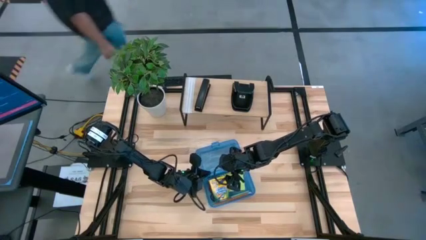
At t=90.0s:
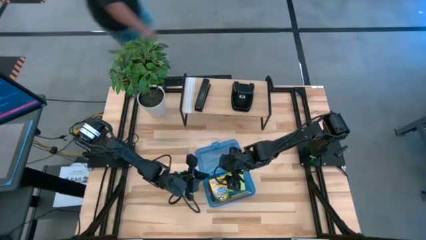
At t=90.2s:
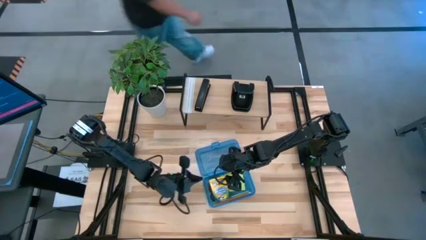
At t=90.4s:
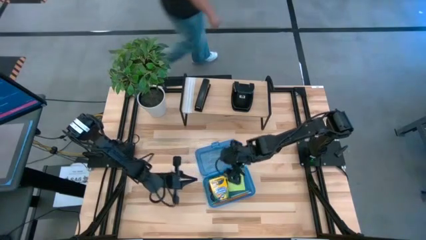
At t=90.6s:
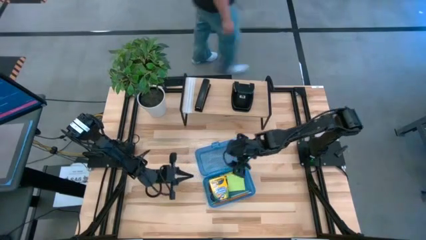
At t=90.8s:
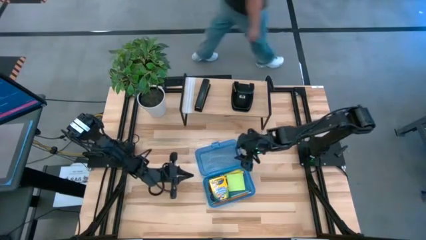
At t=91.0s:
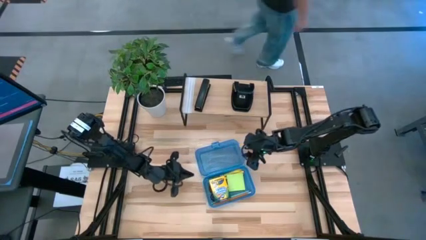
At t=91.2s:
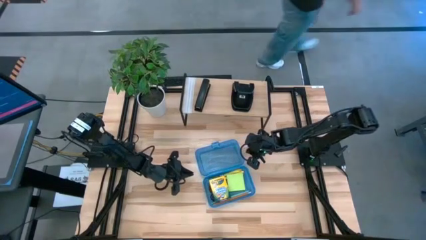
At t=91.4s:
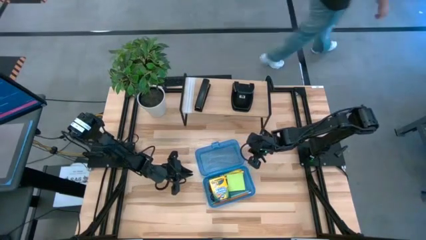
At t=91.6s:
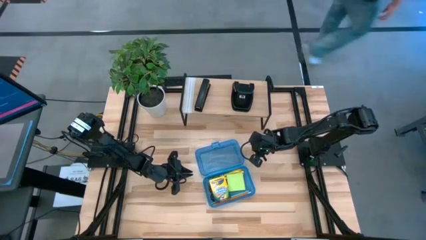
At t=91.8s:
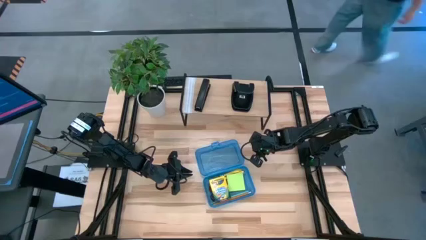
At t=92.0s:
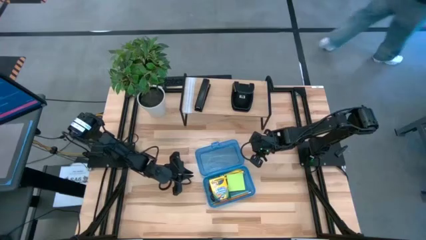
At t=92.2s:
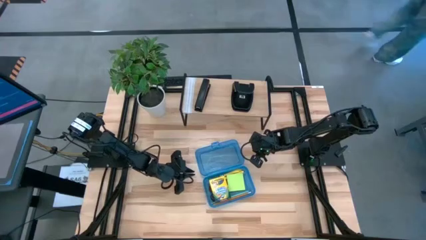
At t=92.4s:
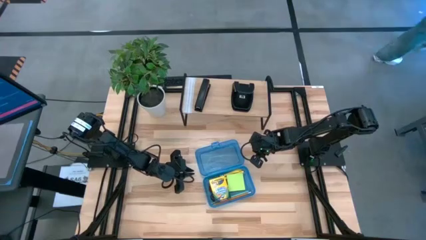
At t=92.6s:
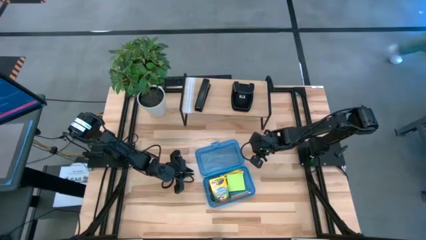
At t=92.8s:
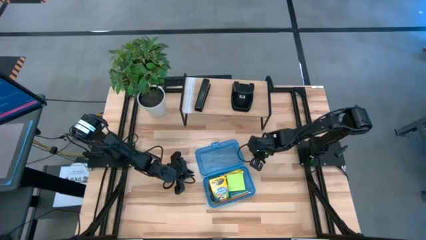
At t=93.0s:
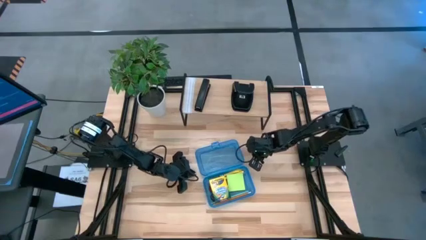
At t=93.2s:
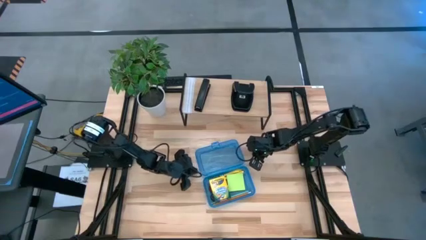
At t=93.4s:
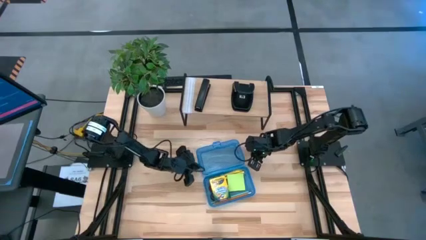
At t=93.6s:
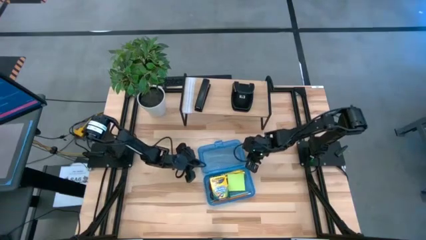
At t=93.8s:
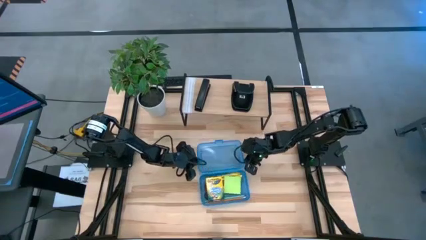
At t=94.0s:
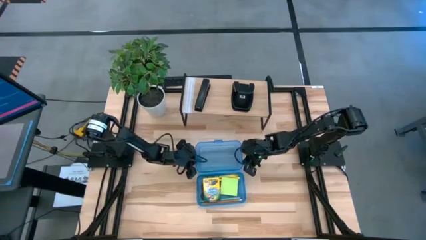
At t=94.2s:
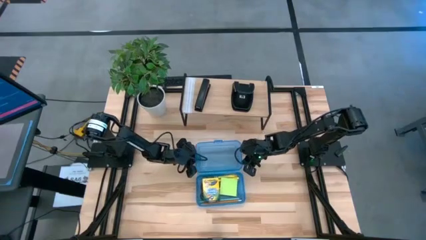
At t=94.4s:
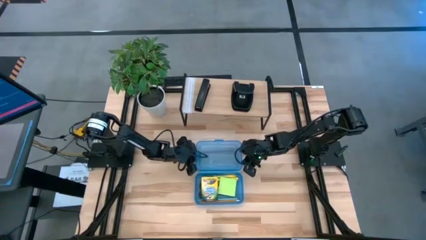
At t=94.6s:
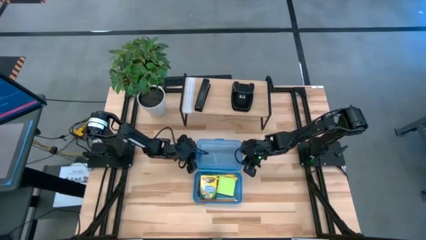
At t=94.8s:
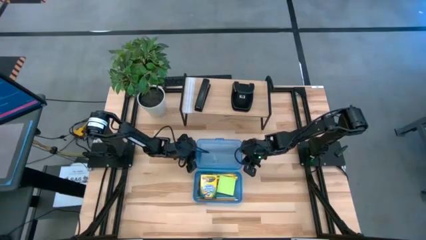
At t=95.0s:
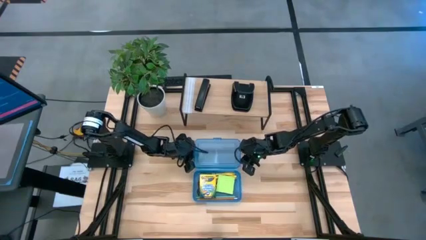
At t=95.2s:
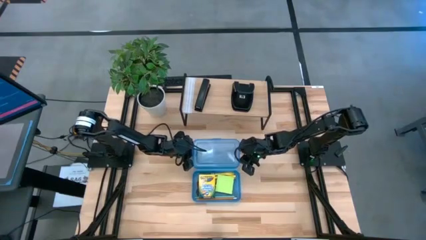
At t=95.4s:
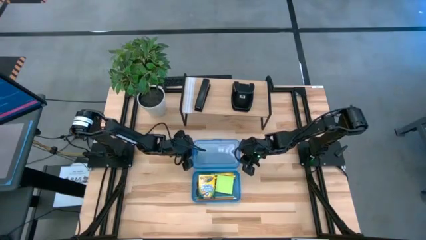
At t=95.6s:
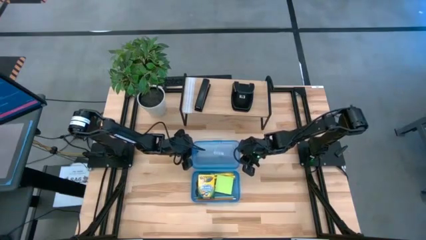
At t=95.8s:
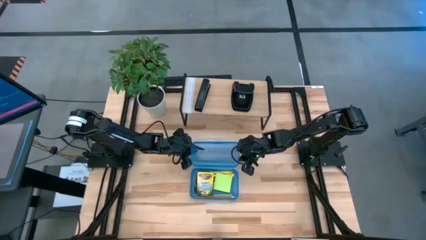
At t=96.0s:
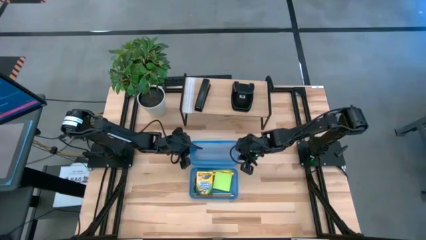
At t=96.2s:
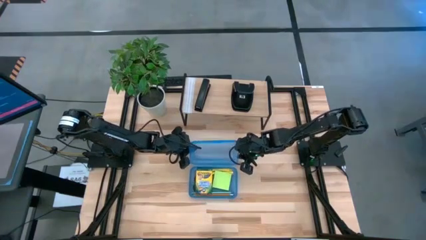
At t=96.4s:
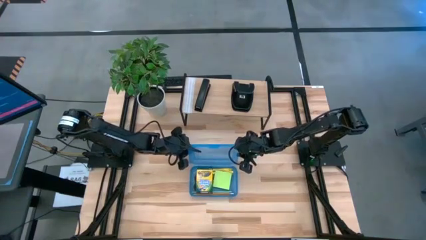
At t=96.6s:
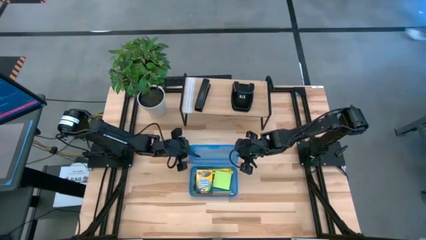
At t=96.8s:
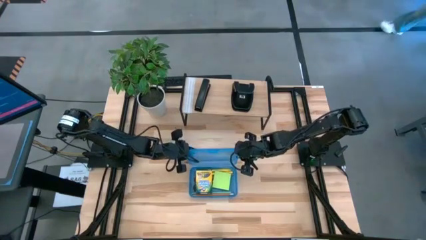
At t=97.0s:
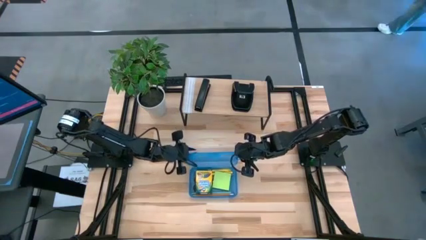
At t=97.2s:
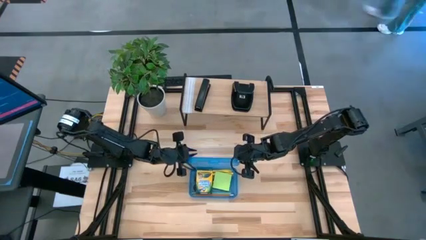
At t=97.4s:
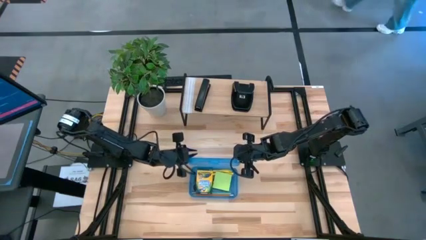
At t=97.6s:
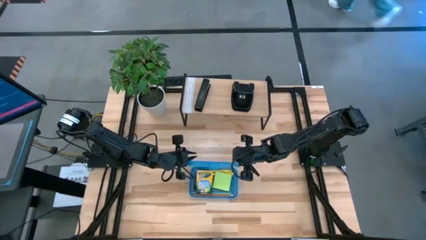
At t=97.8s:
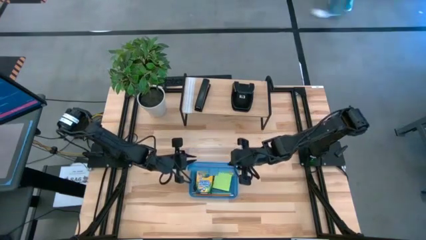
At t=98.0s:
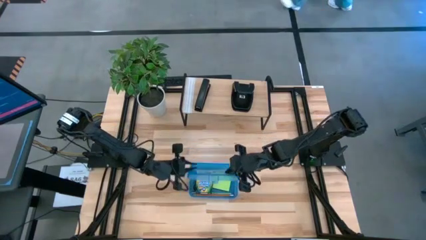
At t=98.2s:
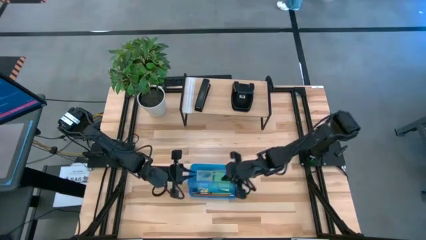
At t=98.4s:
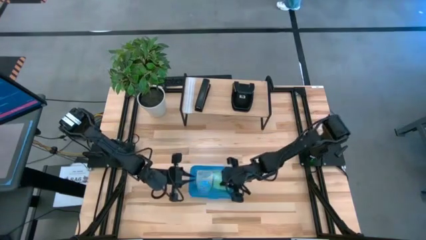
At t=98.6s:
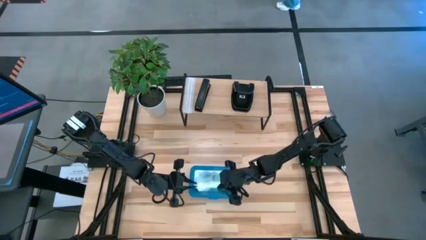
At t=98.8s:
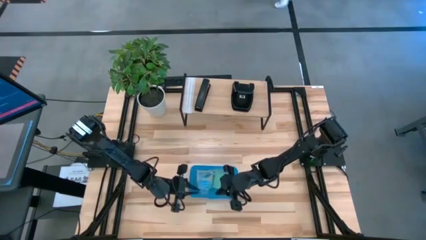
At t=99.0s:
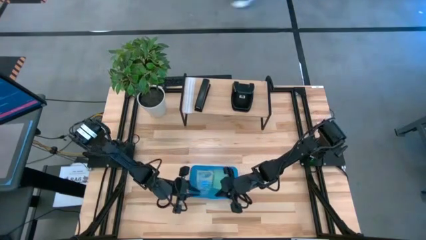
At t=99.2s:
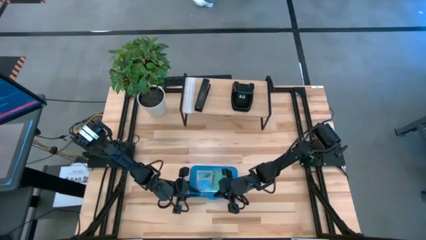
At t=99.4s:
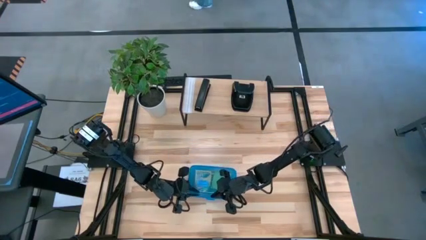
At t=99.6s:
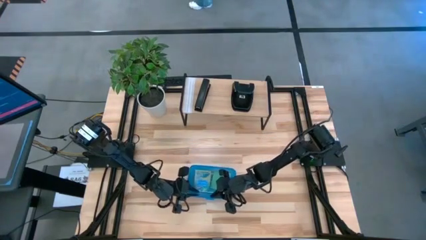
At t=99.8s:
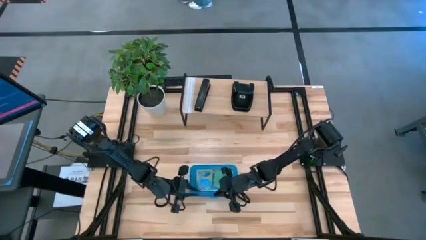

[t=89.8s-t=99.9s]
Task: Pack school essentials
Close the blue supply box

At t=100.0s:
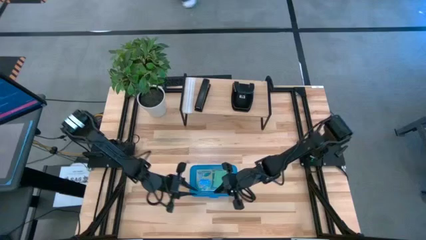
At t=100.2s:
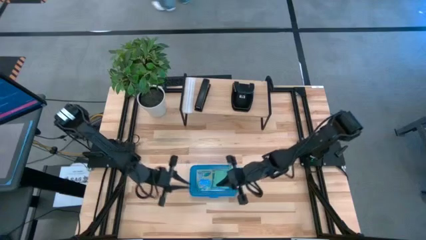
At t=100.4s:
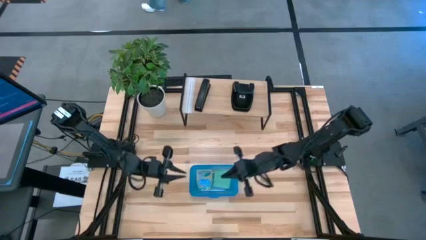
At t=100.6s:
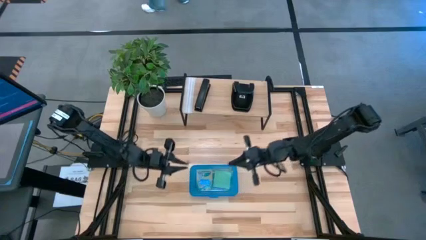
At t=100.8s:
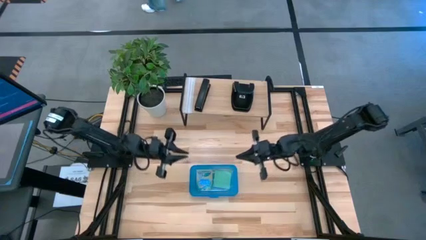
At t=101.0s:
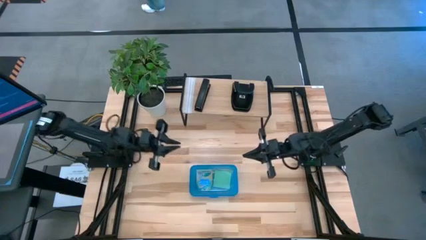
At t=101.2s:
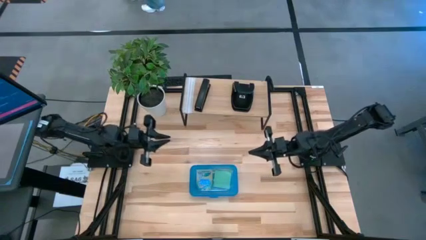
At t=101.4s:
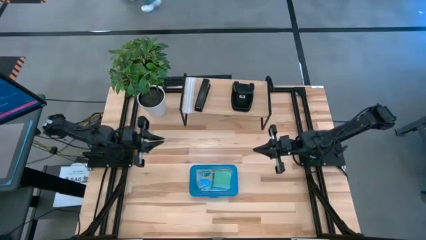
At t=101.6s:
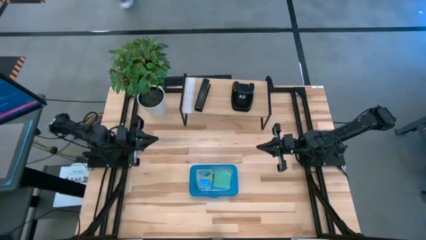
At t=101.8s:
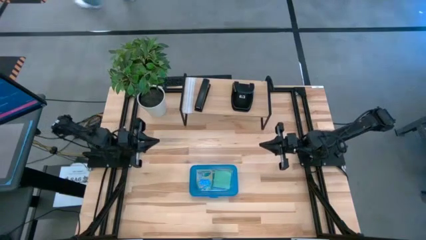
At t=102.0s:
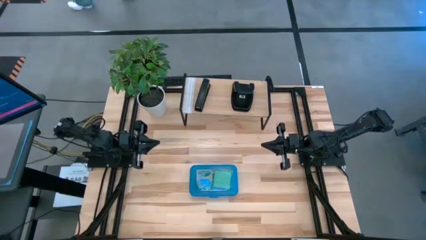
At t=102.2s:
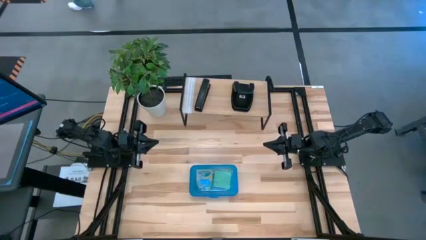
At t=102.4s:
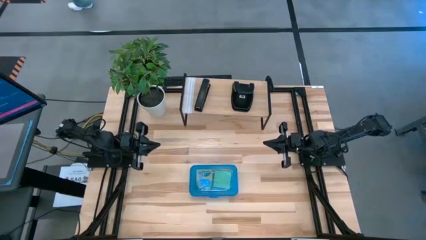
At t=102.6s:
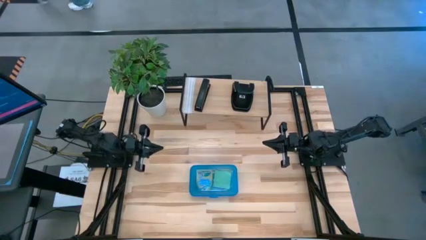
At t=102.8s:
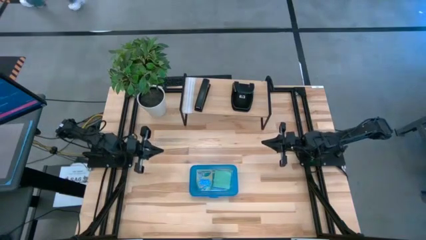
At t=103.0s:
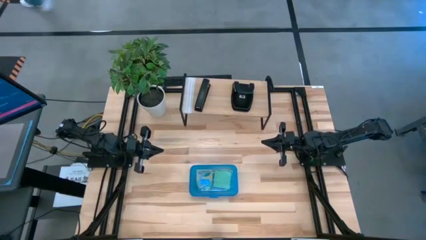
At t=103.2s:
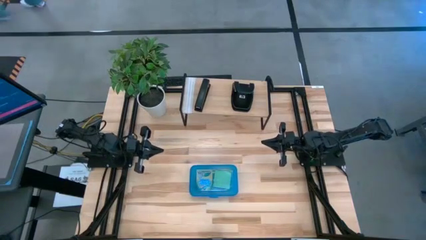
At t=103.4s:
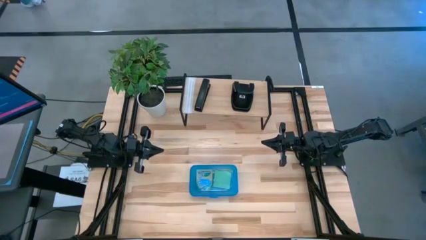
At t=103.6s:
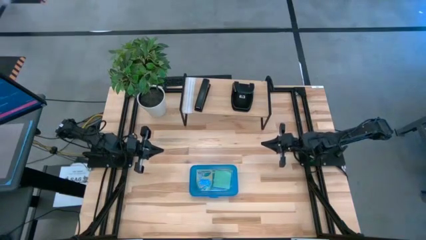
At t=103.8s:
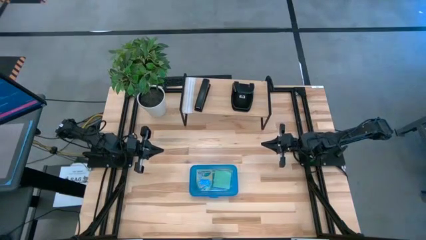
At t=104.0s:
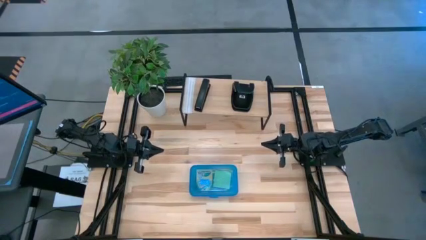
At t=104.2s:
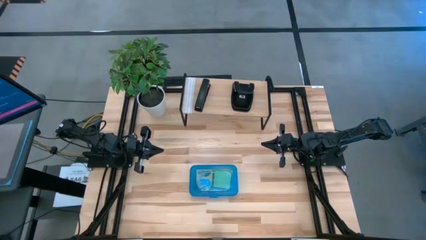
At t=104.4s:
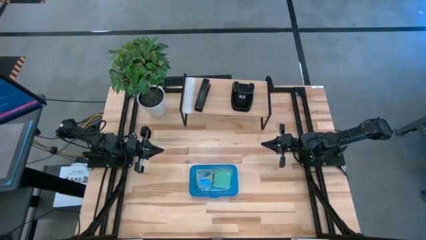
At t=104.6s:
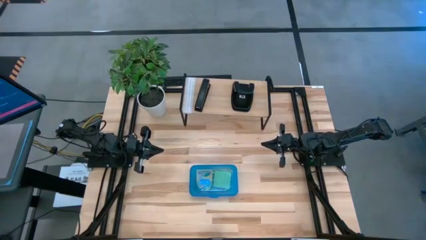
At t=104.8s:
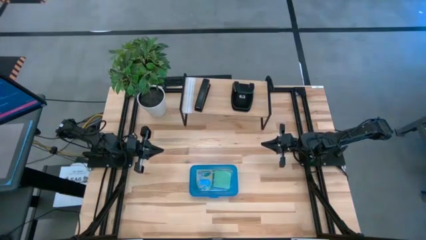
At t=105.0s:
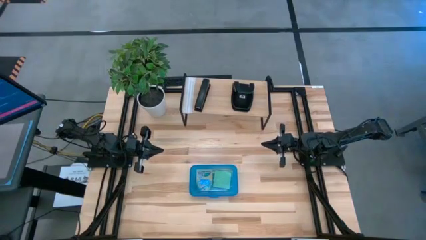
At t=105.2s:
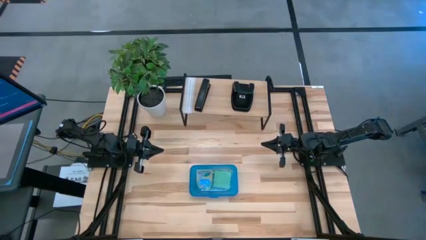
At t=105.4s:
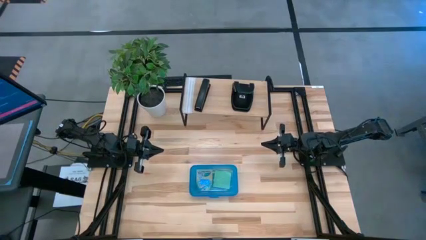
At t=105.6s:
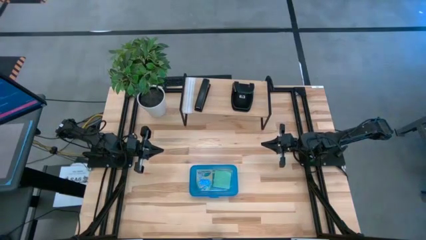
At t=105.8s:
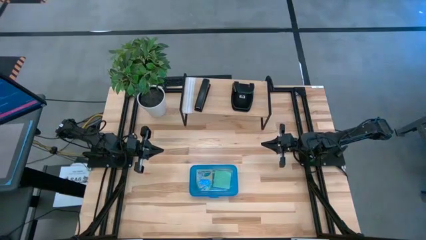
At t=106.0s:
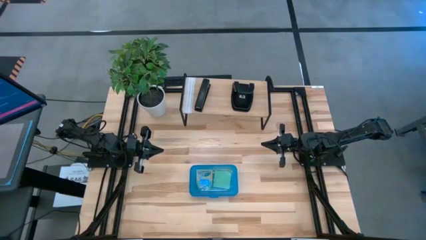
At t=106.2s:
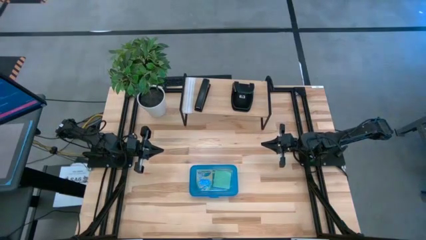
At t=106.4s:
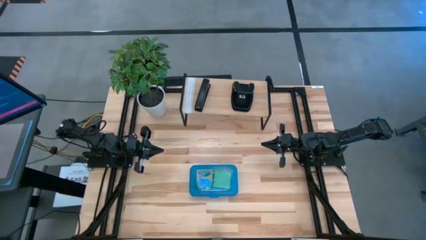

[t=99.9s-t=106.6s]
Return to Home Position
